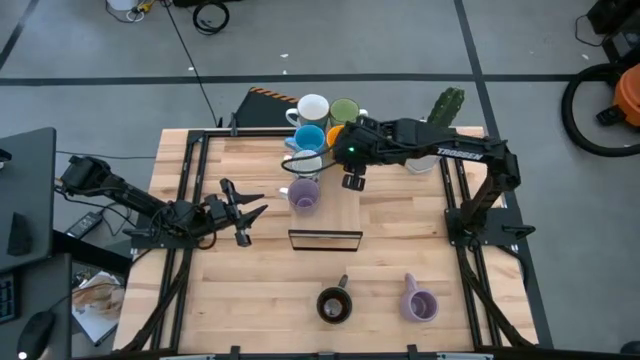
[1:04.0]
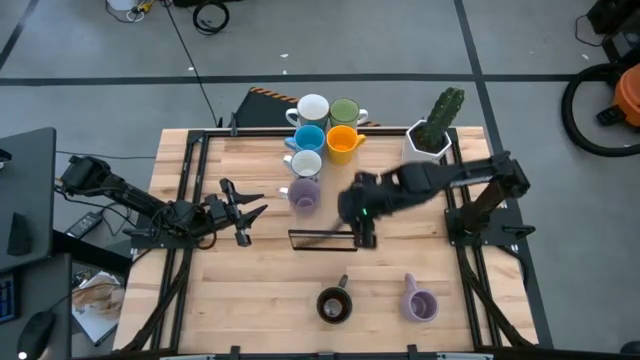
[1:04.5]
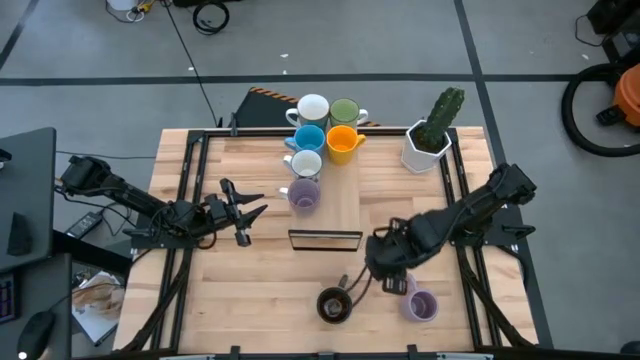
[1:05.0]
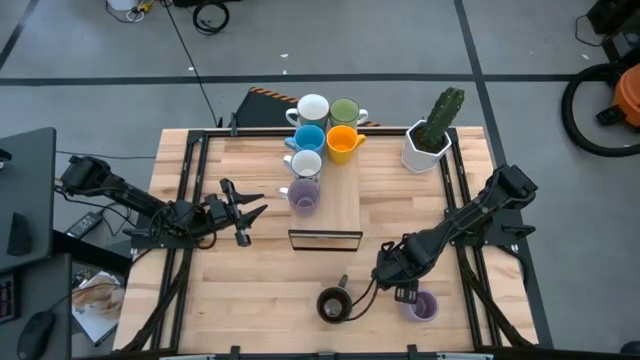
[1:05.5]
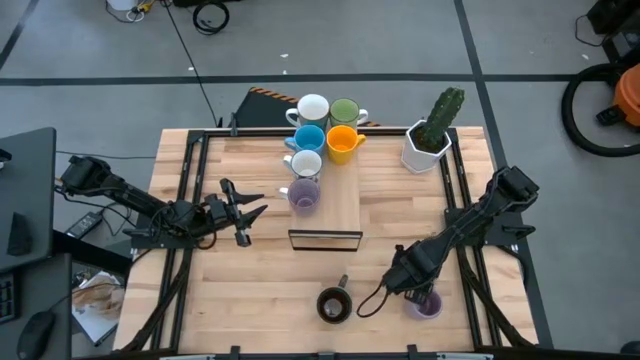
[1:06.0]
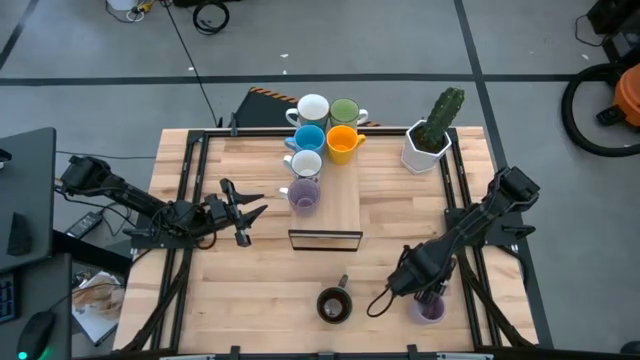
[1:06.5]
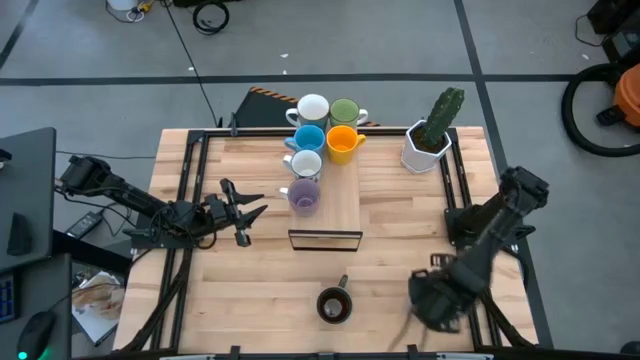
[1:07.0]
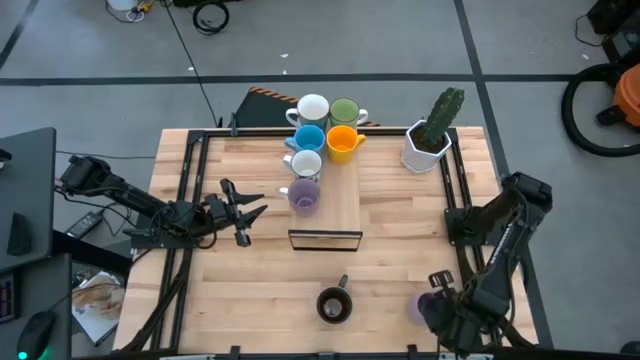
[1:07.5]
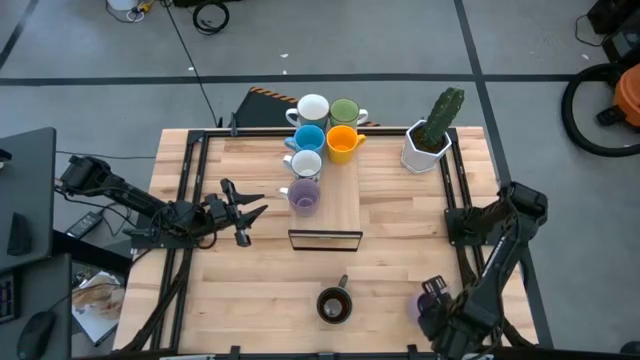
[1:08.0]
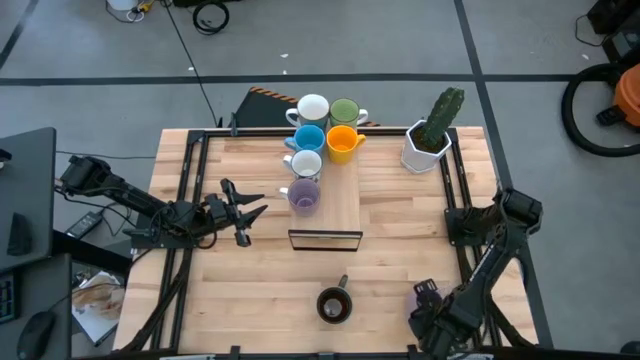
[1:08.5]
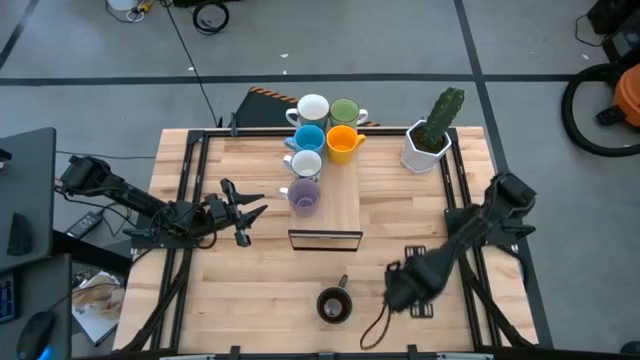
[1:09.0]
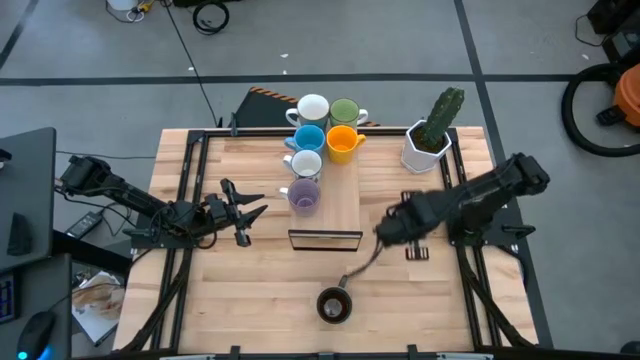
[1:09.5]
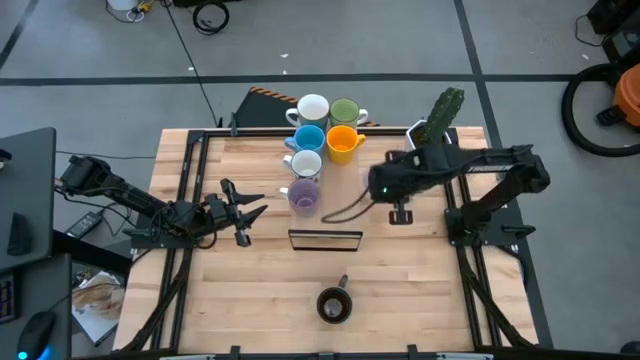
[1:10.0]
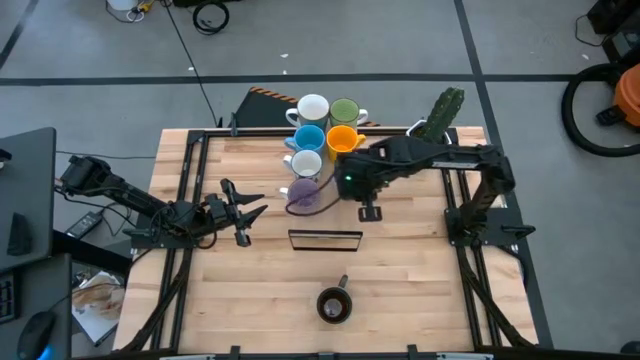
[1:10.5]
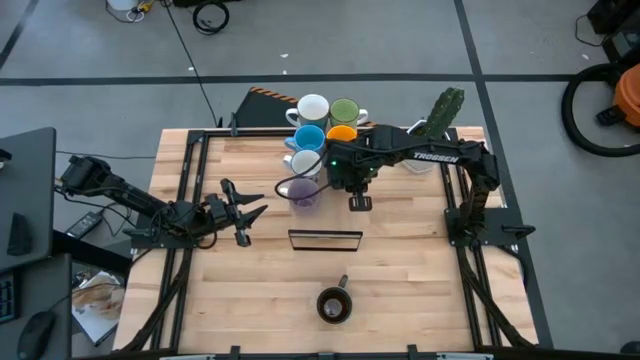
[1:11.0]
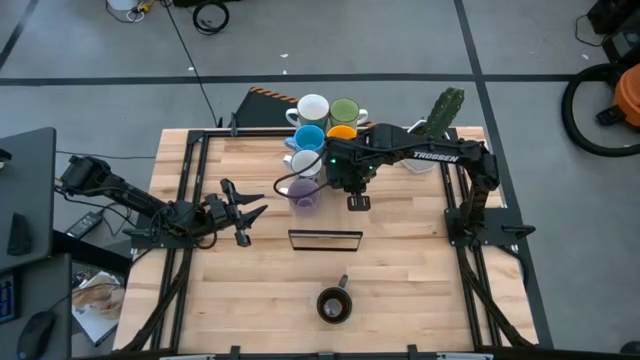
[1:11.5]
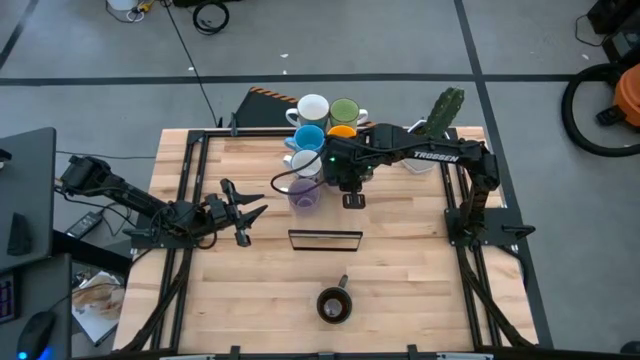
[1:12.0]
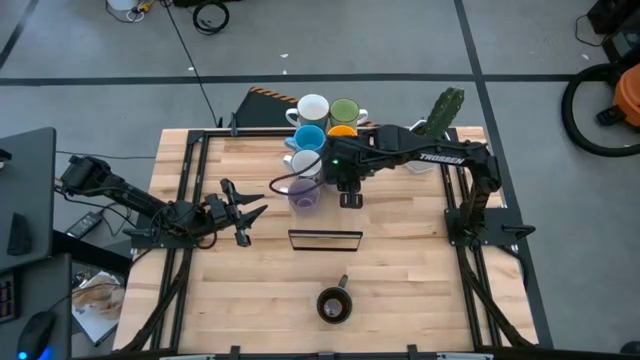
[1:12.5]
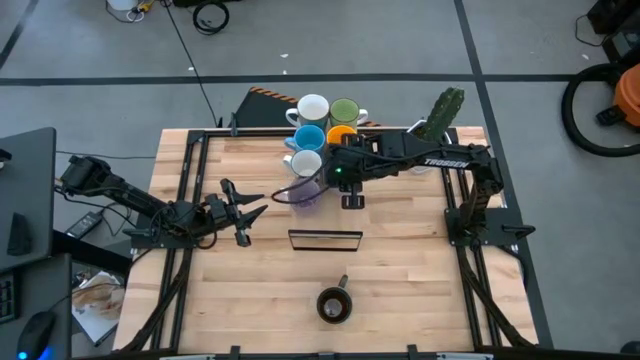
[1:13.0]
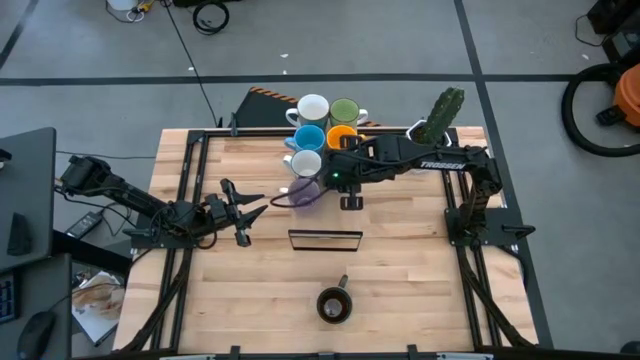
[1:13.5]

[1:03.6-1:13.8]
Task: Place coffee mugs
Put the purple mug on the shelf

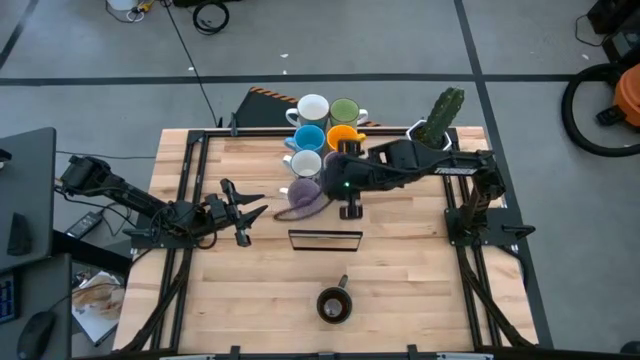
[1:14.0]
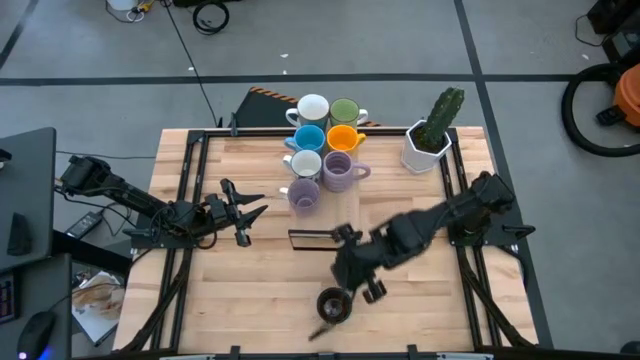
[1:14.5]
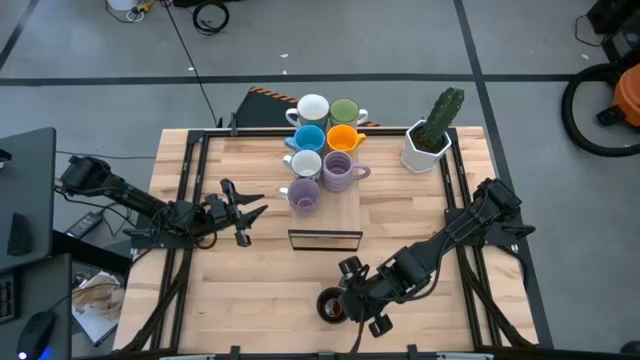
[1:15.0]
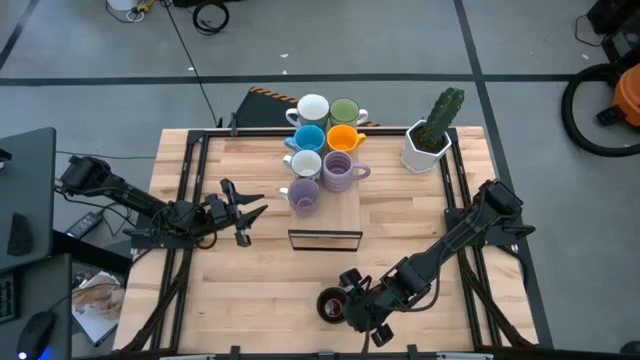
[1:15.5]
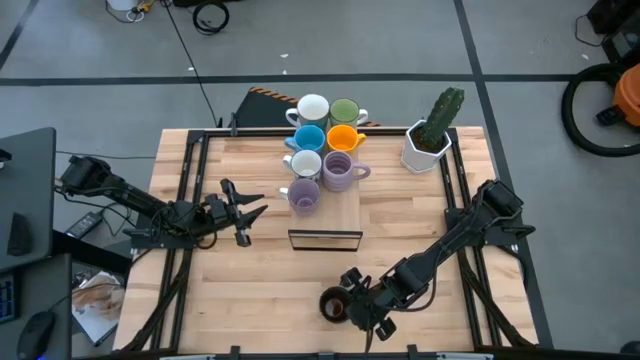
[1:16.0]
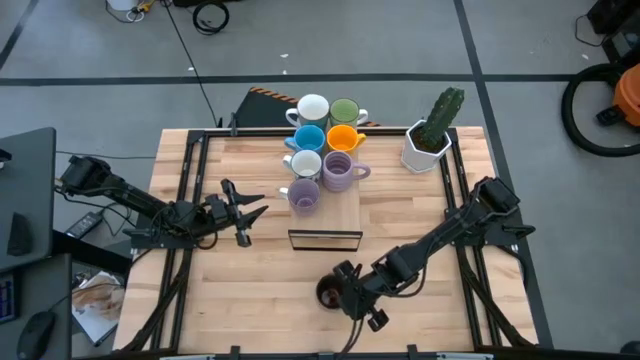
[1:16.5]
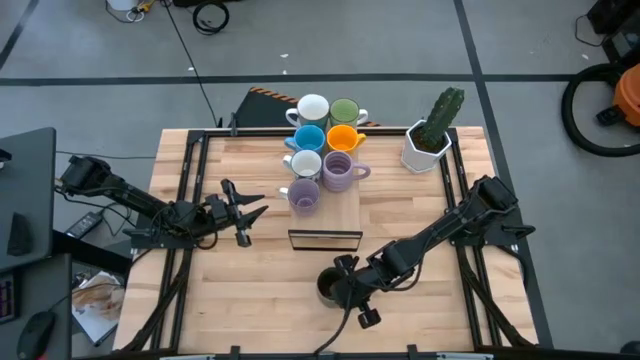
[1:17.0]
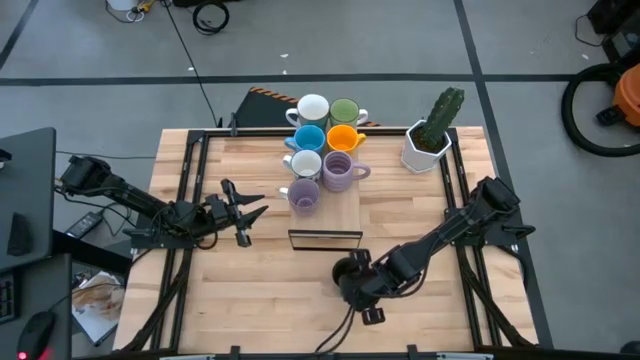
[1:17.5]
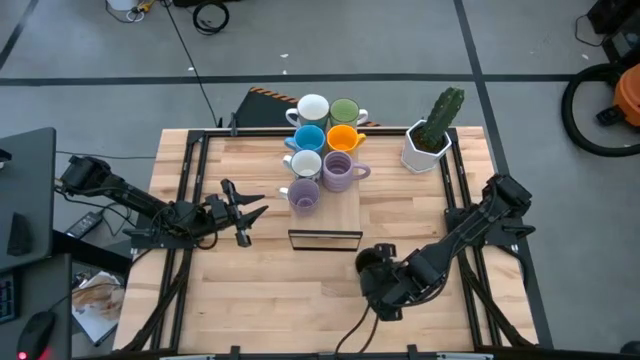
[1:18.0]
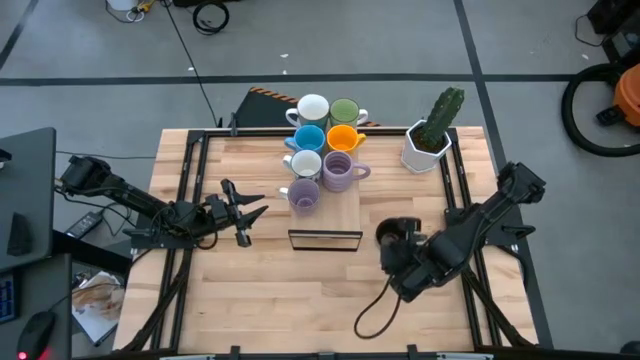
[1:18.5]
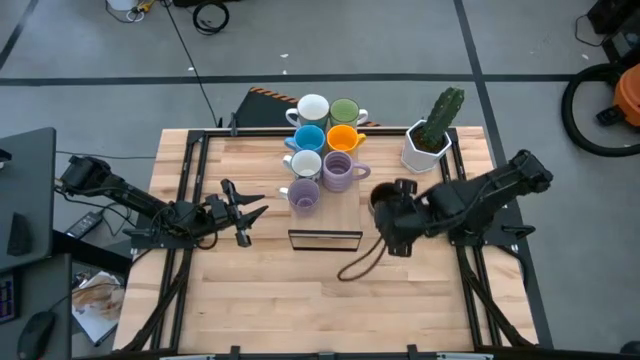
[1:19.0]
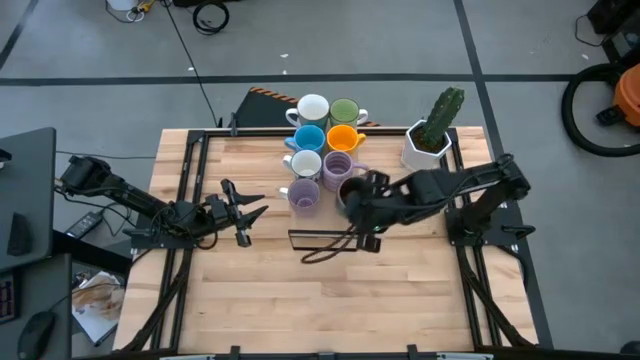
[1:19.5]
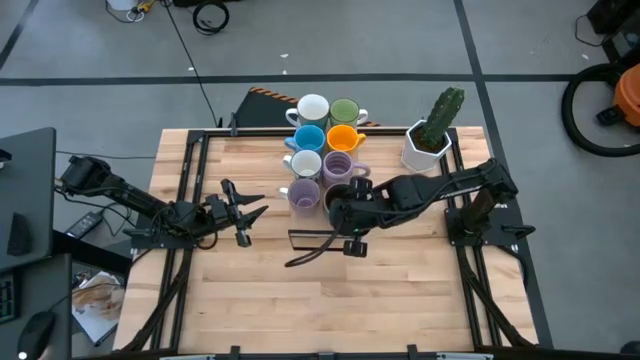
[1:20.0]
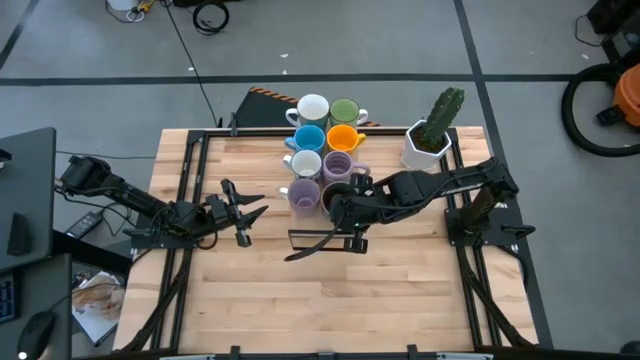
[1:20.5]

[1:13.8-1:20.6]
Put the dark blue patterned mug on the shelf

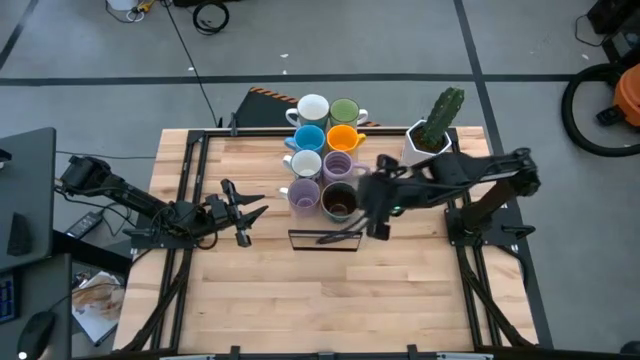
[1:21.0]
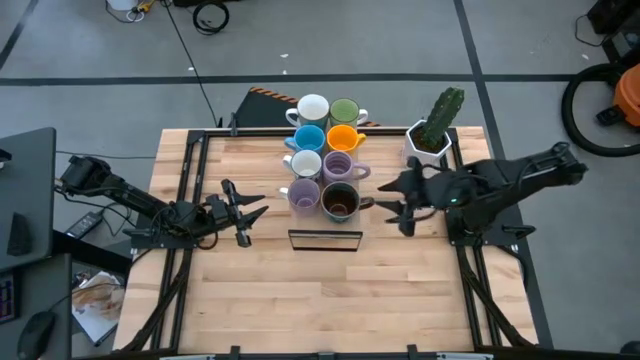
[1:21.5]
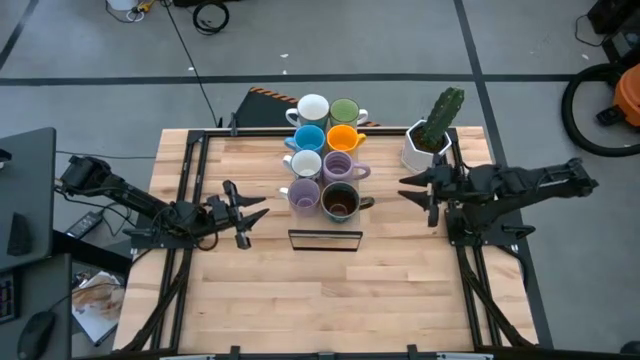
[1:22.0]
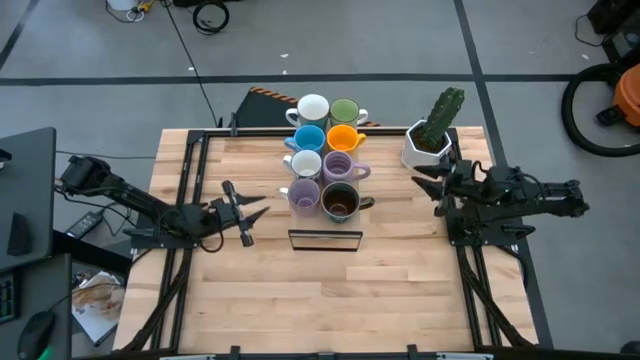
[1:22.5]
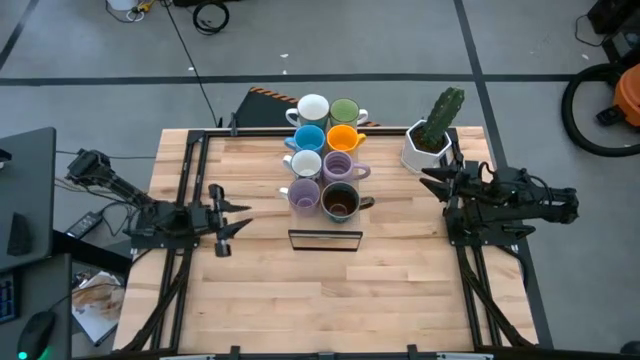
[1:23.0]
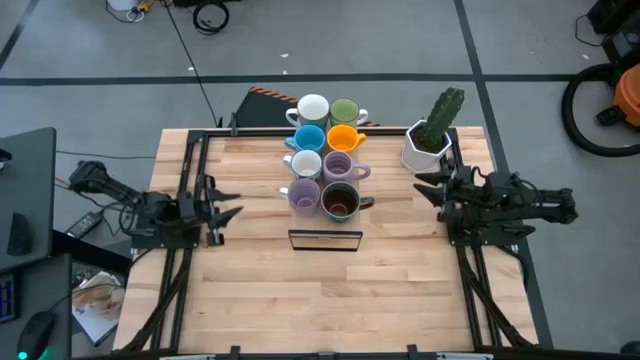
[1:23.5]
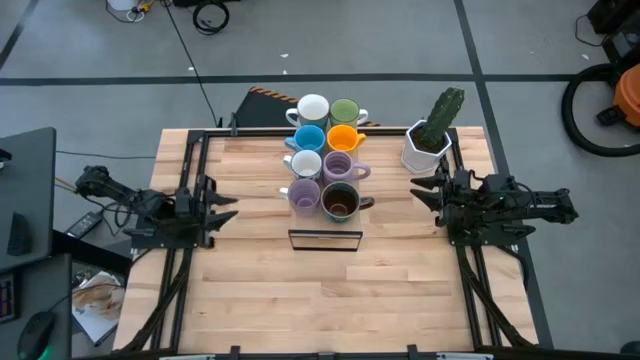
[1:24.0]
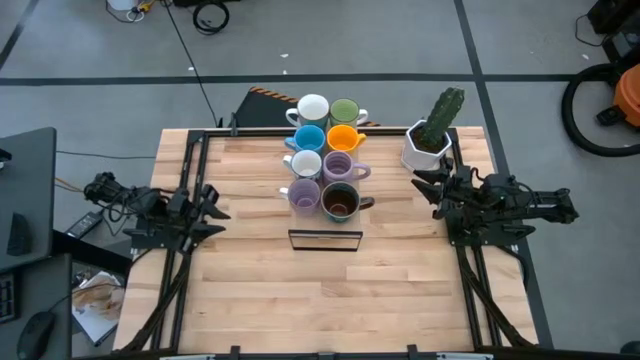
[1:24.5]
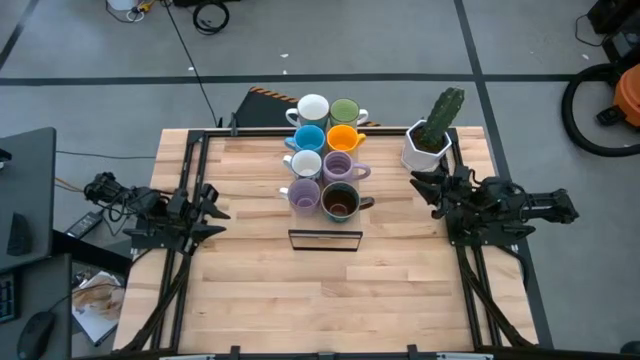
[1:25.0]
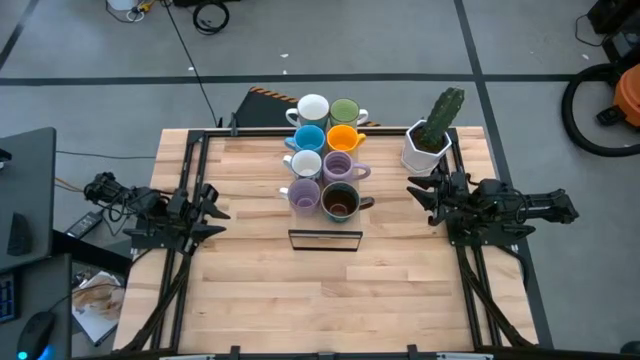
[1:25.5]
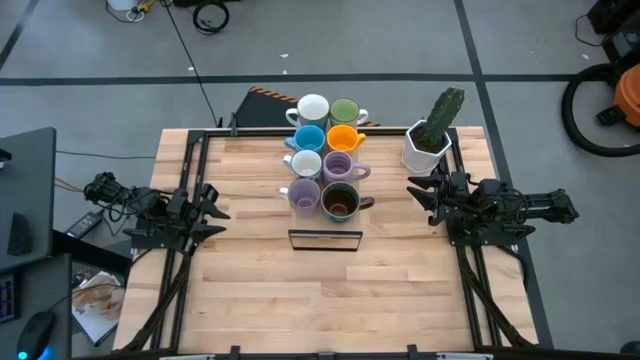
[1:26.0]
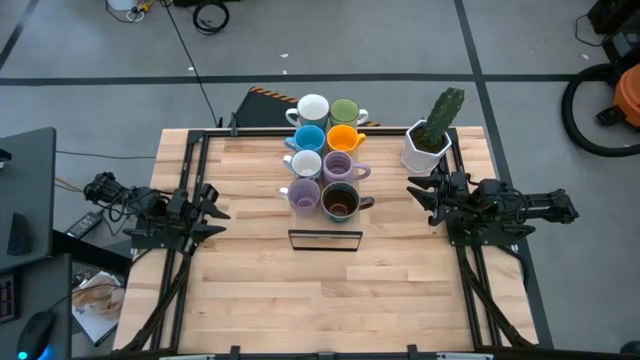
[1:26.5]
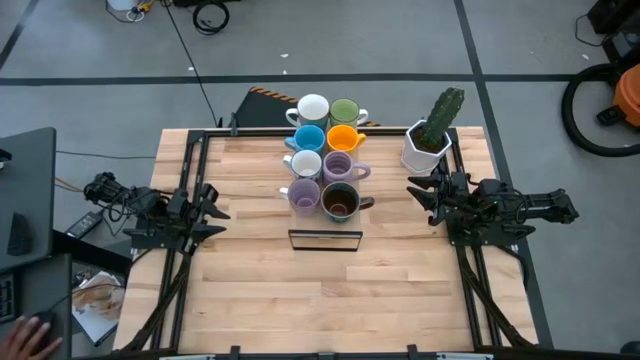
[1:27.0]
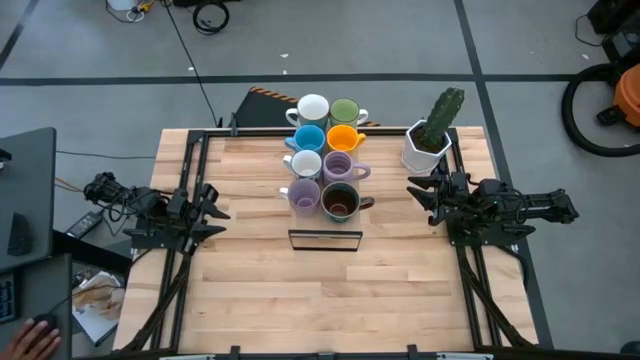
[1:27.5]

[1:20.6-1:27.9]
Return to Home Position
